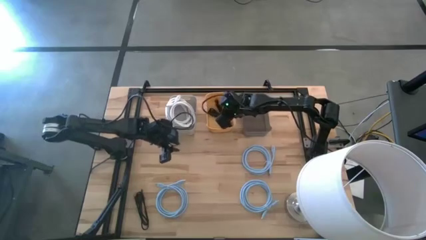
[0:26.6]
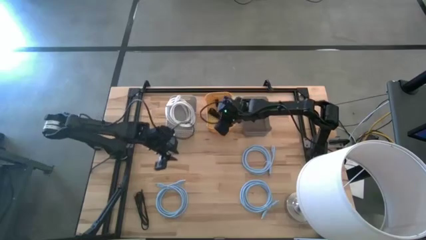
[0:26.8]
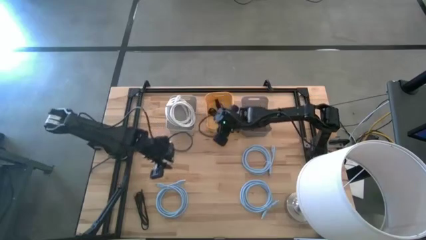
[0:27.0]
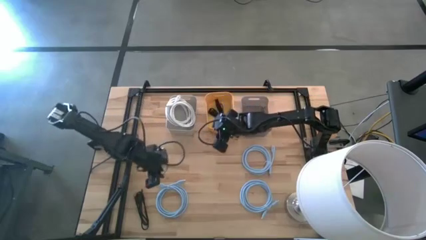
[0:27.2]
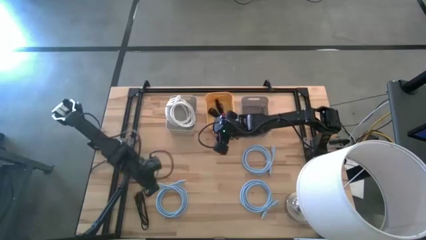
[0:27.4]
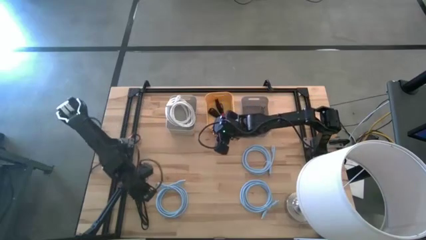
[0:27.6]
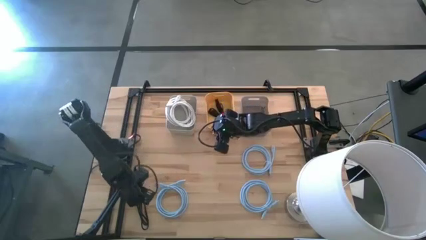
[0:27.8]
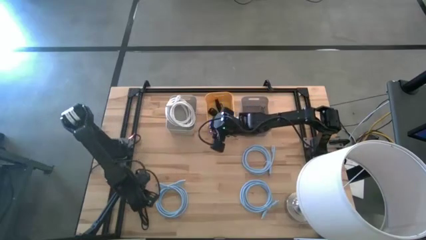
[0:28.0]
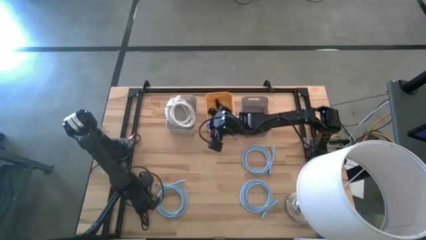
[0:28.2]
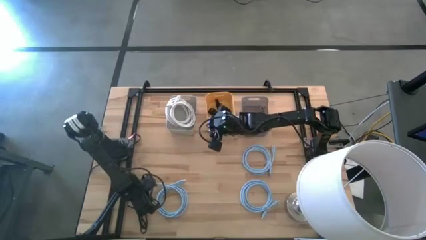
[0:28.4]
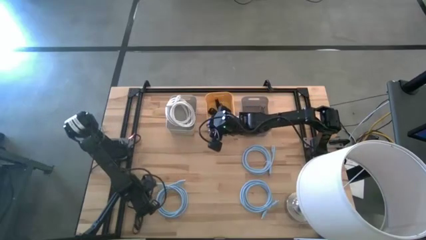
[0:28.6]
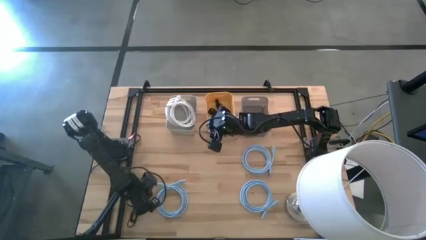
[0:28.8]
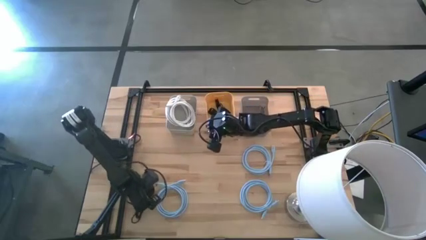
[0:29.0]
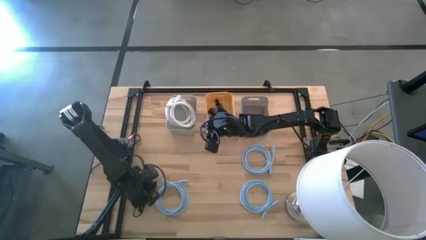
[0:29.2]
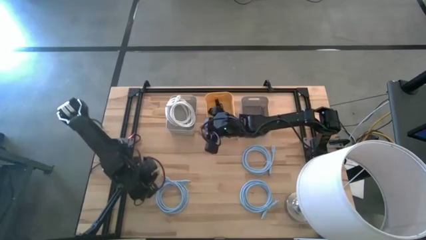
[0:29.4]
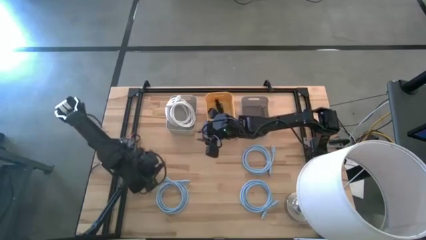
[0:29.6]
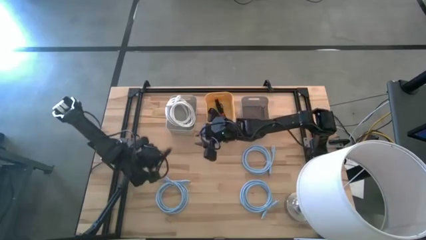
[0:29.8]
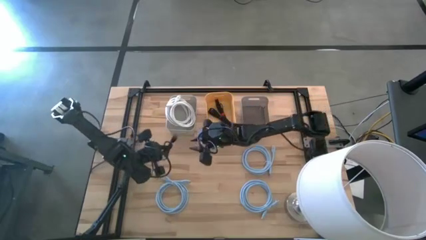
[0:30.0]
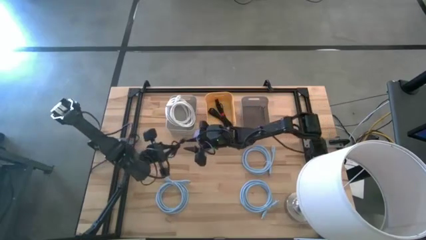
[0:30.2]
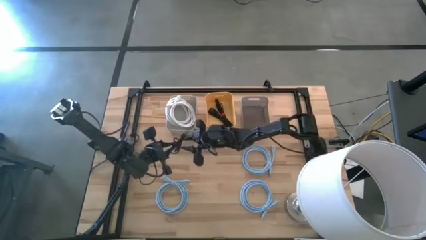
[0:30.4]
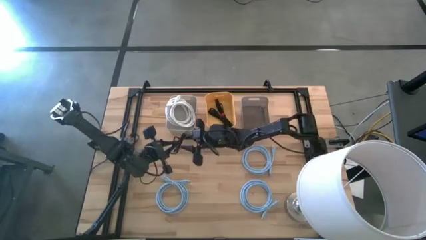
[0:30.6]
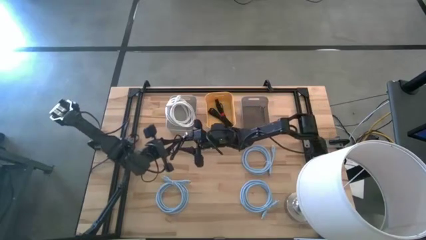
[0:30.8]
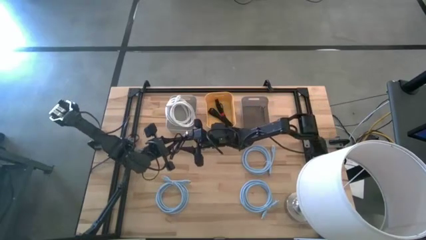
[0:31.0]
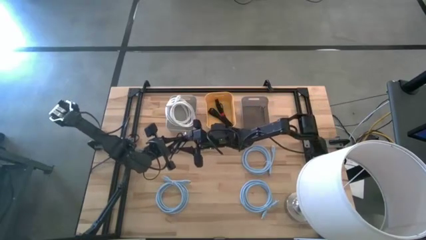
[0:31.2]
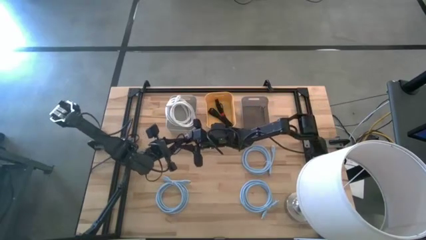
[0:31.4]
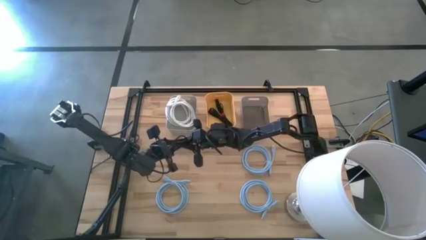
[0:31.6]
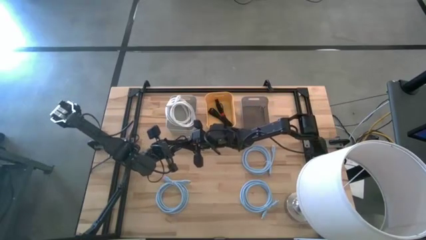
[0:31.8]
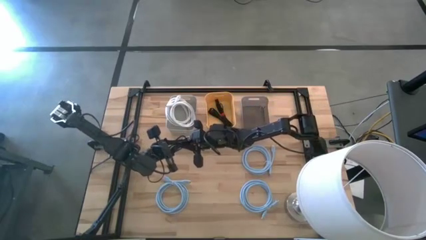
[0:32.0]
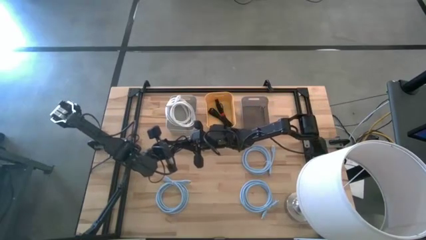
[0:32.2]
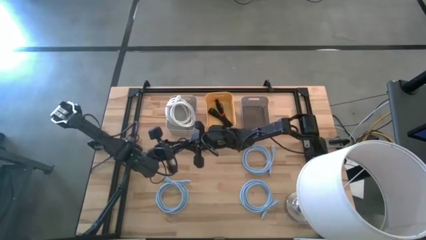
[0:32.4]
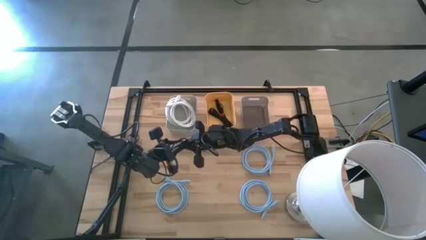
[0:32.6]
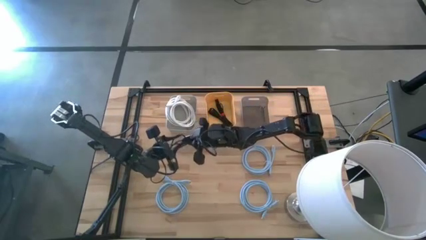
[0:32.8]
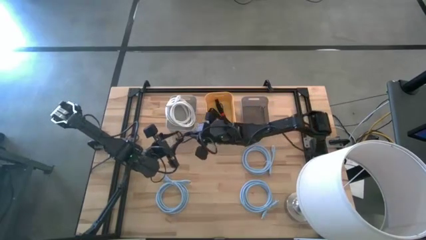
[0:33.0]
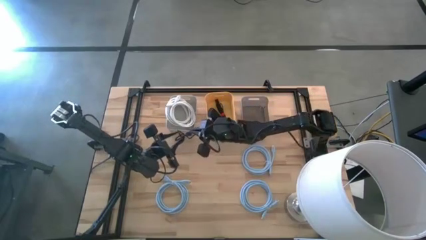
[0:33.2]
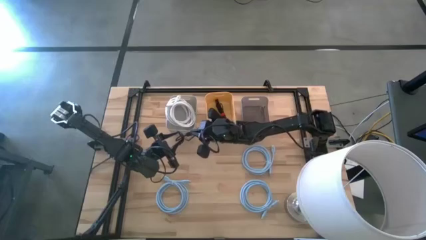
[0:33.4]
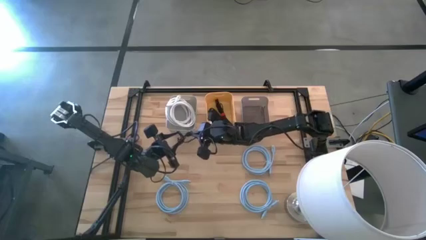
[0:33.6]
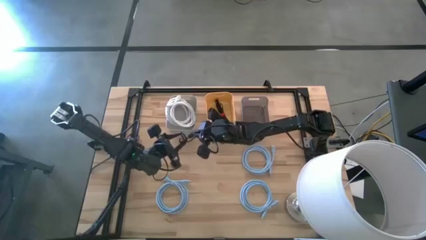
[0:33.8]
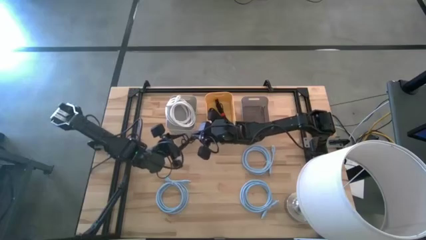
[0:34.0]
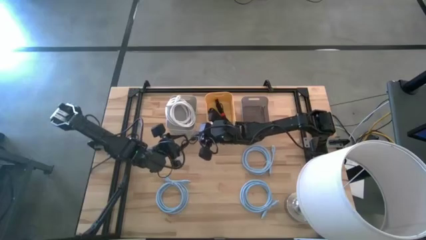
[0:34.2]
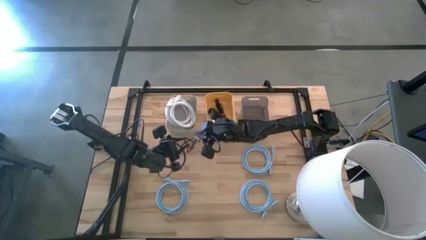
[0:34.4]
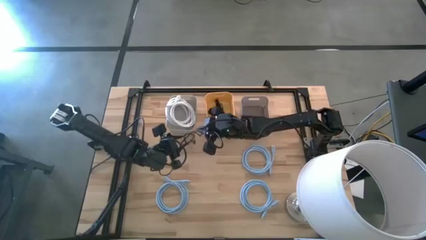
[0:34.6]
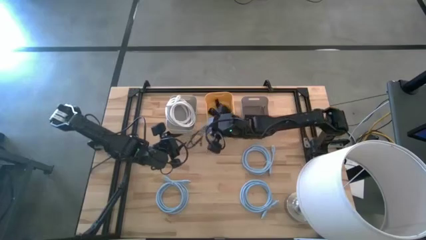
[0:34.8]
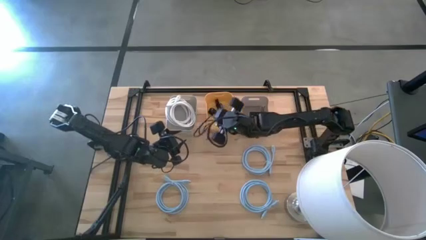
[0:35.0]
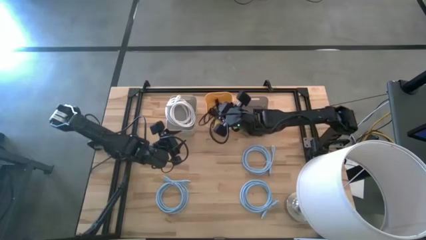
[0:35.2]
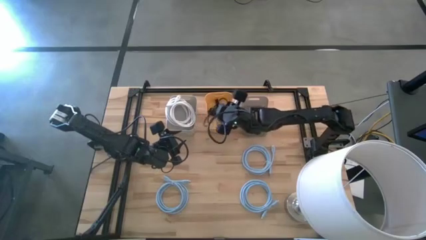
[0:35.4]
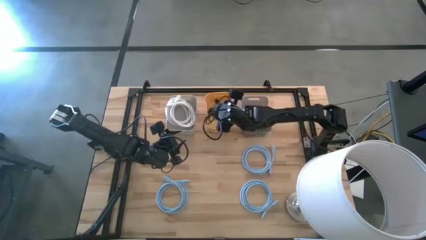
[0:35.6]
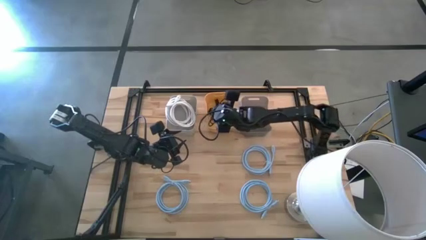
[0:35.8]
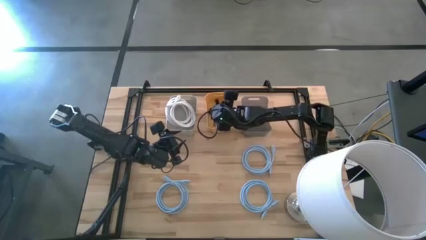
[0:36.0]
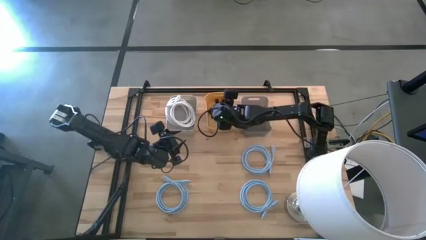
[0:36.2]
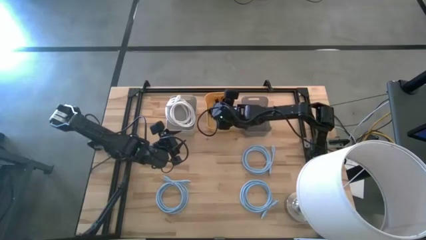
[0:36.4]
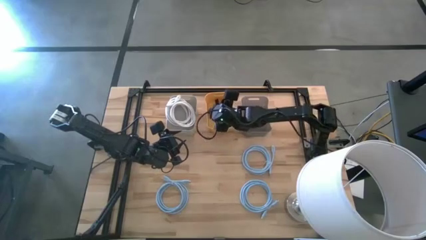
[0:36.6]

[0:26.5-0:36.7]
Task: Sort HDMI cables
Put the black HDMI cable into the yellow bin

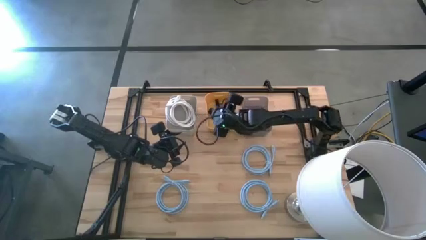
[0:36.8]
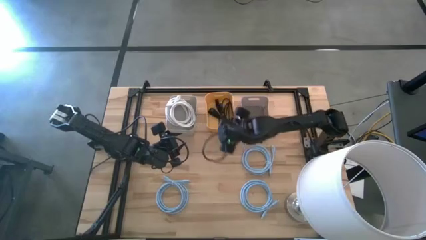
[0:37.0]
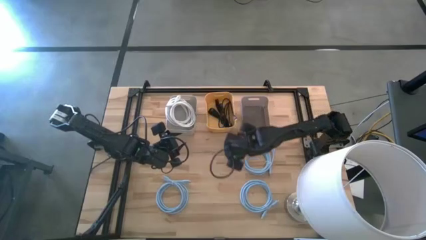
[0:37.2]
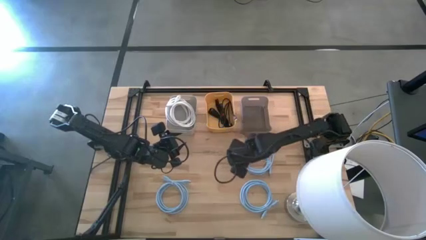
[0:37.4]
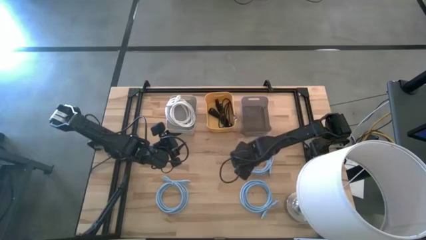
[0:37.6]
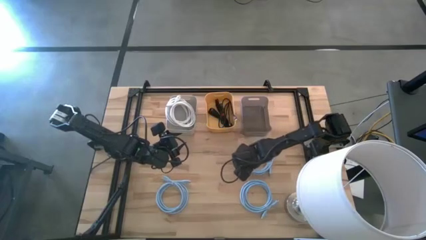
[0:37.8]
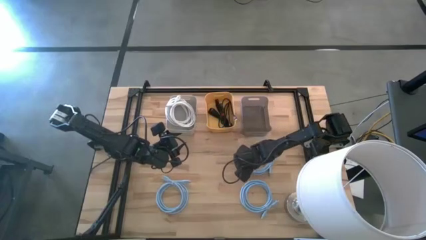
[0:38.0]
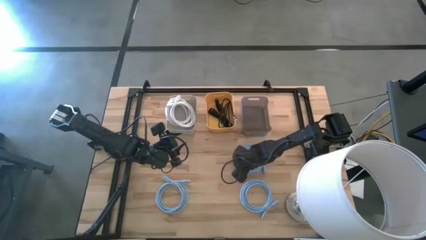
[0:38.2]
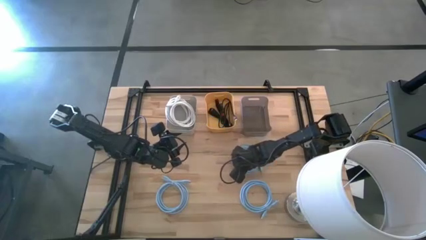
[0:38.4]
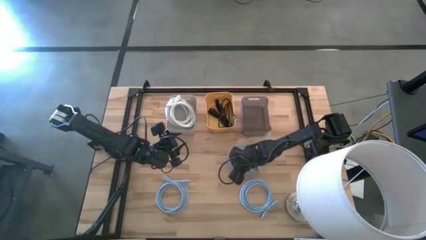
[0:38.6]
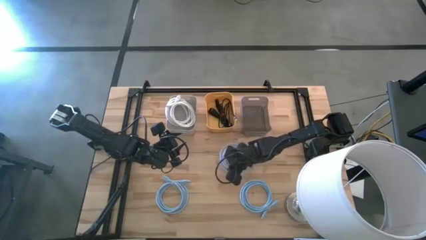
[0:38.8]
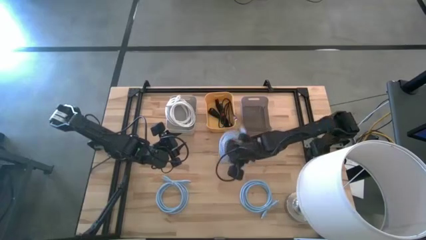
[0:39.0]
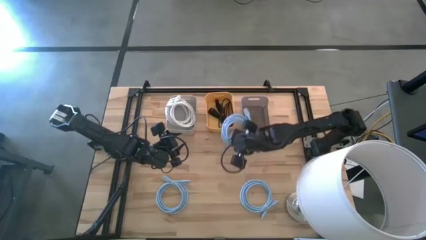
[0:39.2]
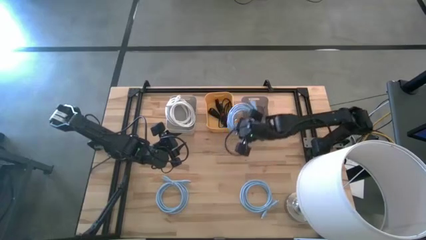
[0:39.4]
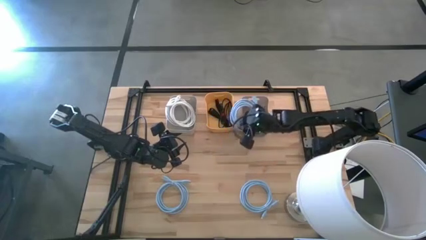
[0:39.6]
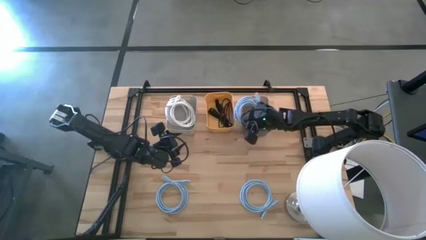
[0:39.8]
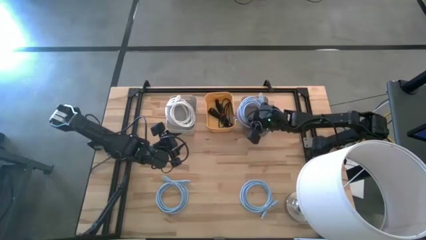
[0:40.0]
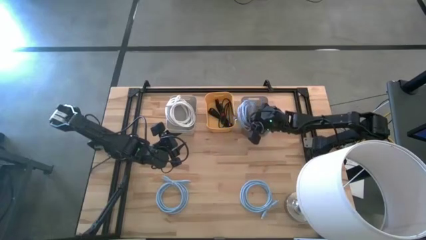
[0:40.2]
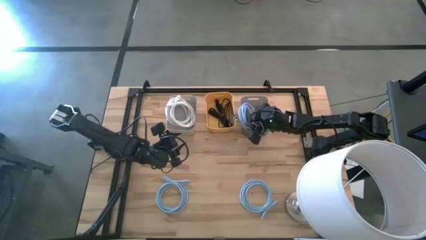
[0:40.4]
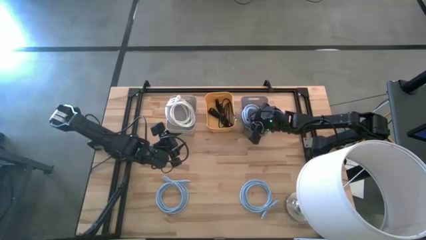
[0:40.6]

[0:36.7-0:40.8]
Put the top blue HDMI cable into the gray bin

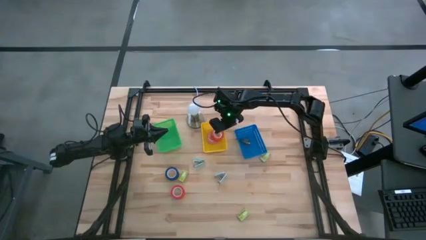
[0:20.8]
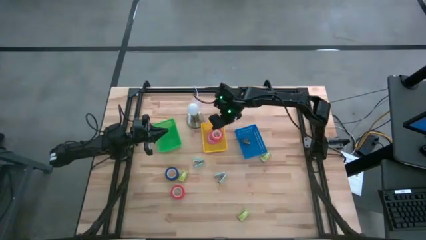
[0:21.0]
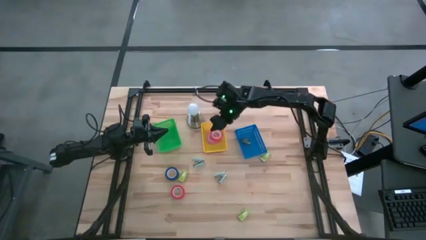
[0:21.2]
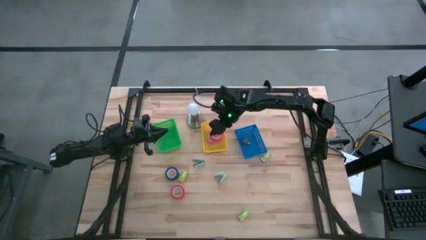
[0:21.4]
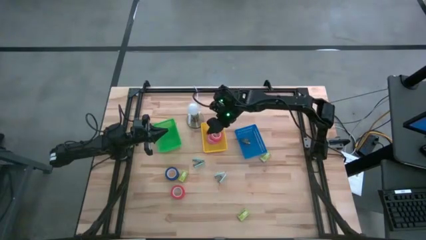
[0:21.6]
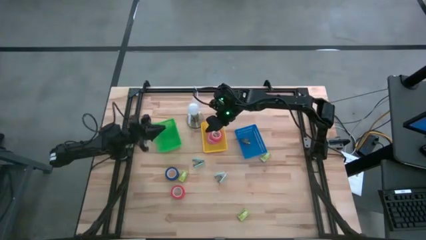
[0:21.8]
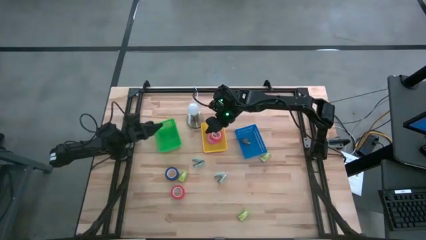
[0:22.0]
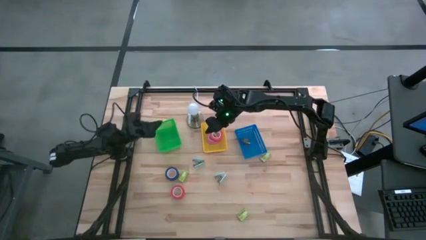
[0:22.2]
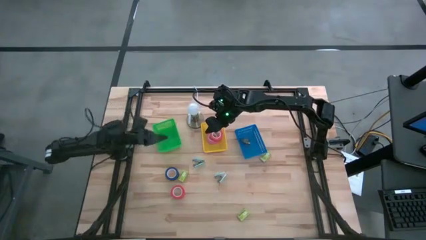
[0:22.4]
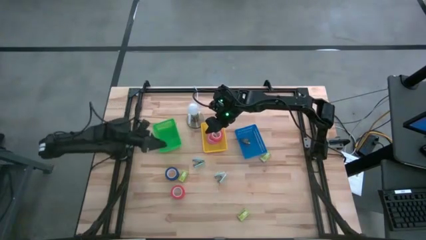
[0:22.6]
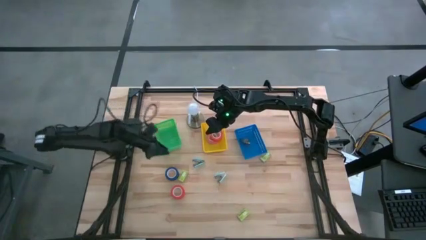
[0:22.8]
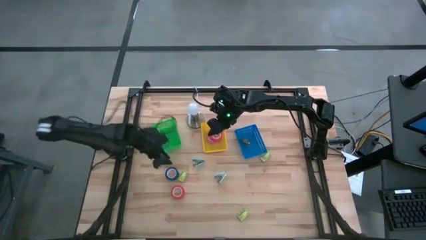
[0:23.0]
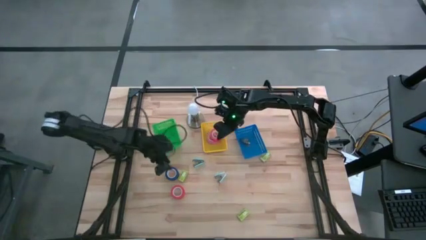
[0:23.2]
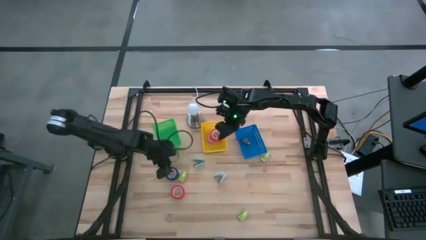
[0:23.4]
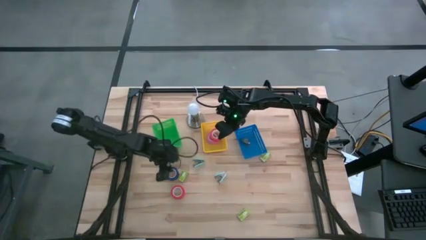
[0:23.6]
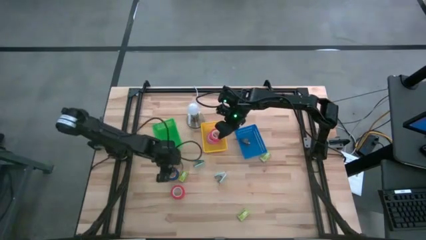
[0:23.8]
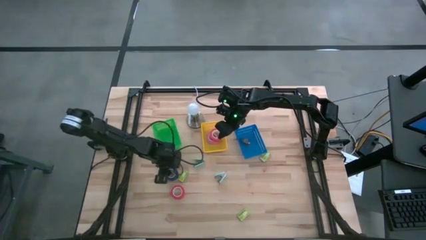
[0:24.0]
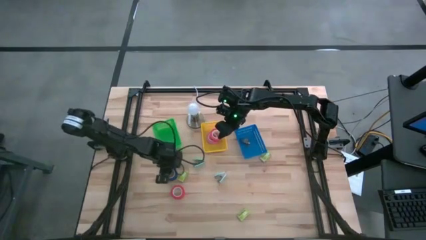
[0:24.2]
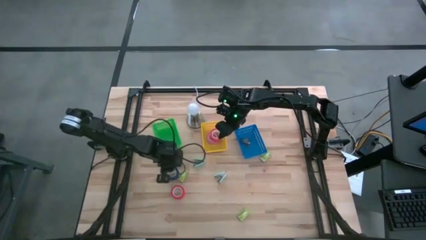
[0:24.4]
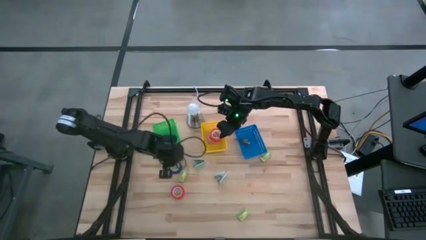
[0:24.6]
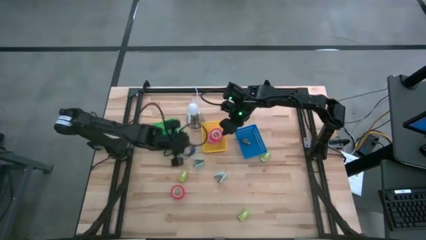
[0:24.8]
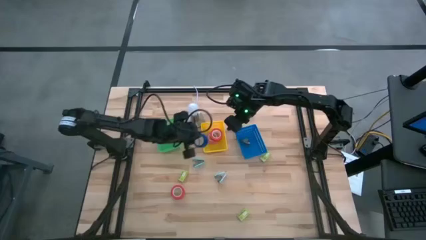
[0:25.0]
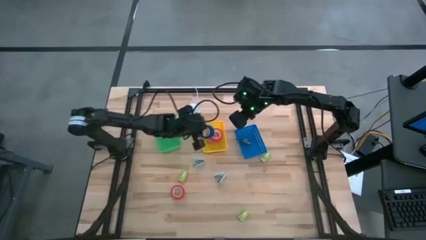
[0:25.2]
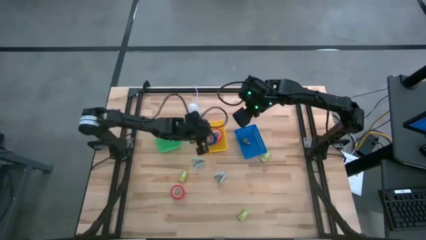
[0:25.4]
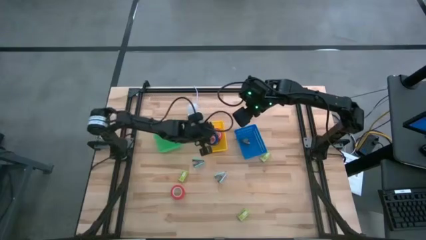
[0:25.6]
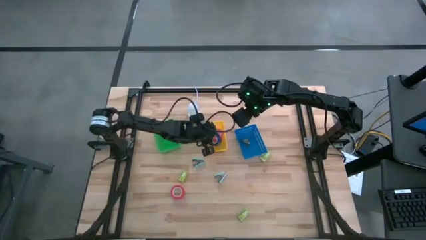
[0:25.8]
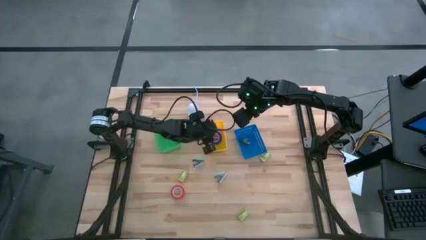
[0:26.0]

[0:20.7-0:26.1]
Task: Pick and place Stapler, Stapler remover, tape
Put the blue tape into the yellow basket
